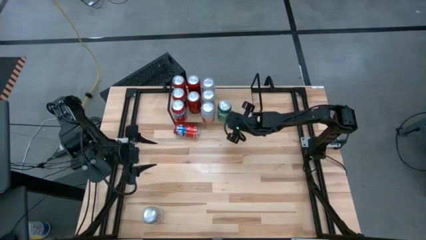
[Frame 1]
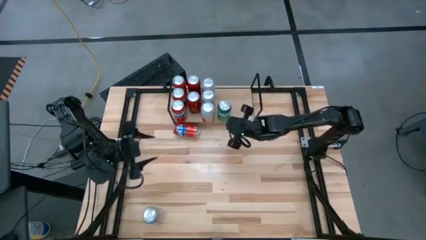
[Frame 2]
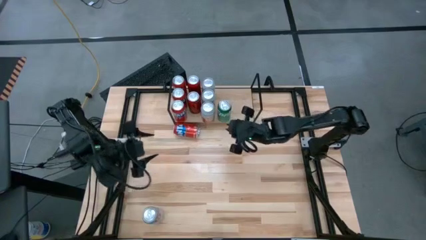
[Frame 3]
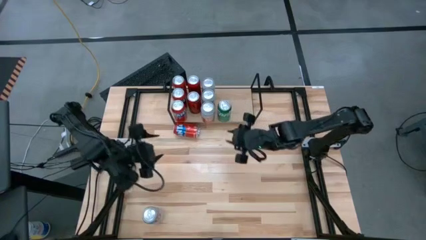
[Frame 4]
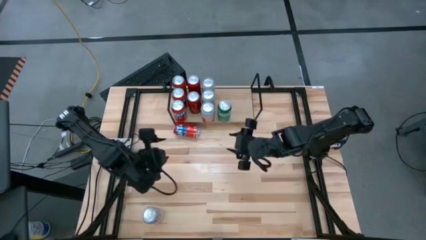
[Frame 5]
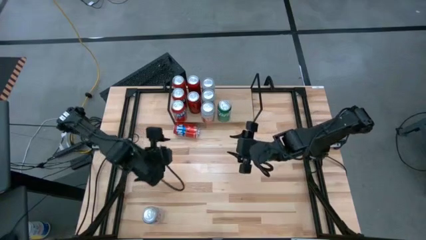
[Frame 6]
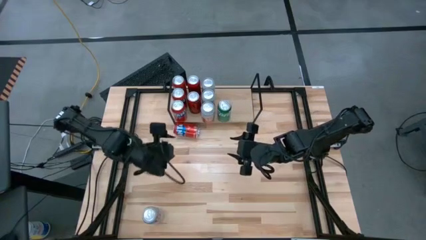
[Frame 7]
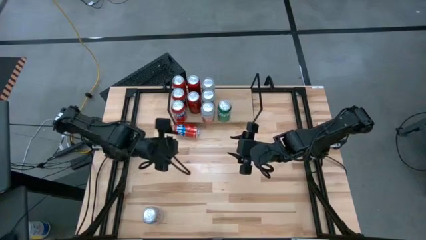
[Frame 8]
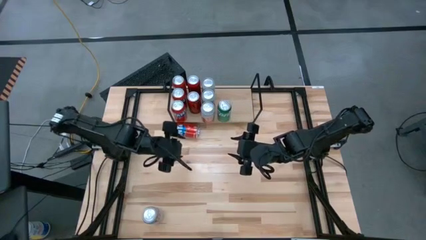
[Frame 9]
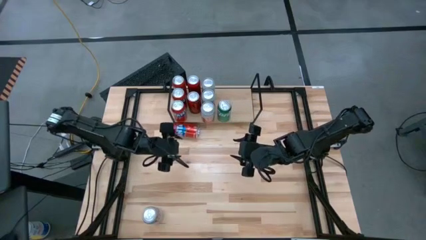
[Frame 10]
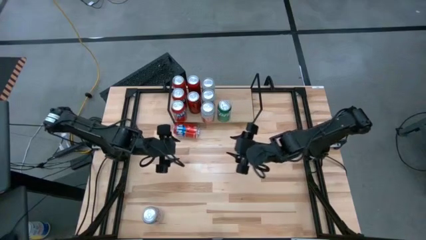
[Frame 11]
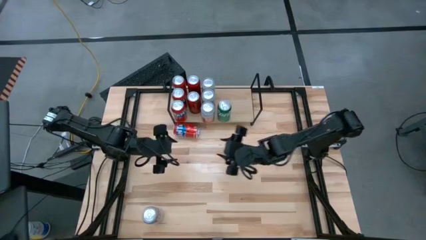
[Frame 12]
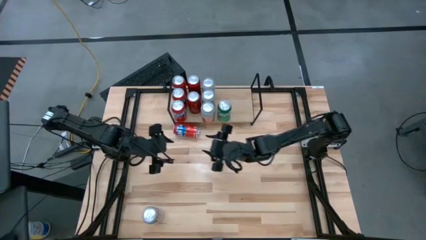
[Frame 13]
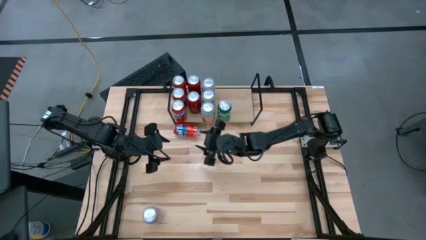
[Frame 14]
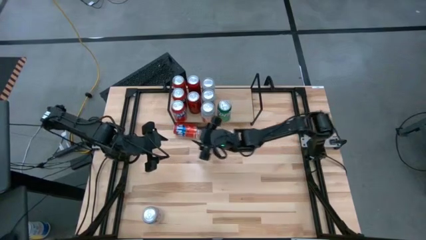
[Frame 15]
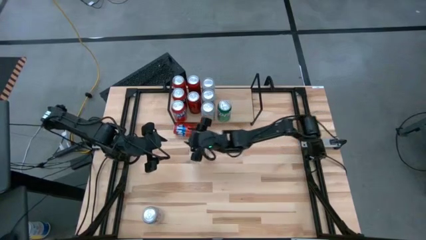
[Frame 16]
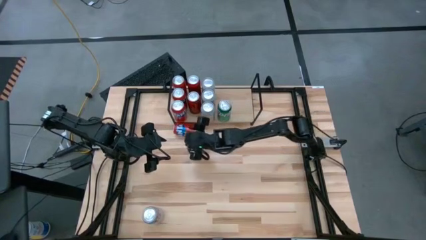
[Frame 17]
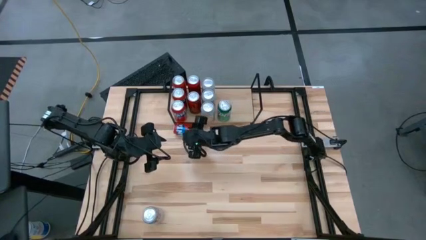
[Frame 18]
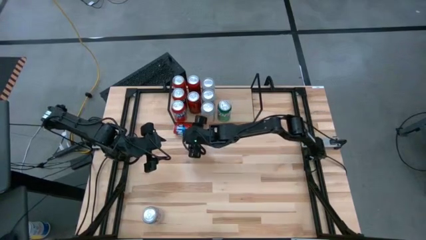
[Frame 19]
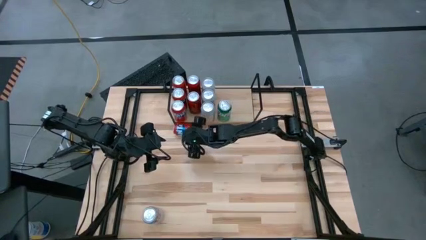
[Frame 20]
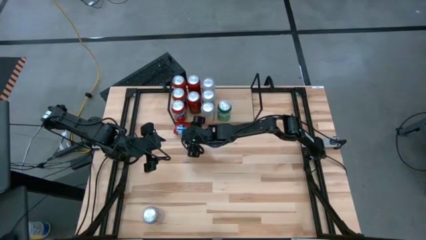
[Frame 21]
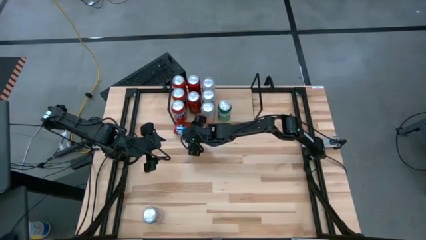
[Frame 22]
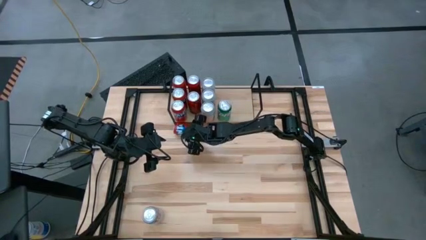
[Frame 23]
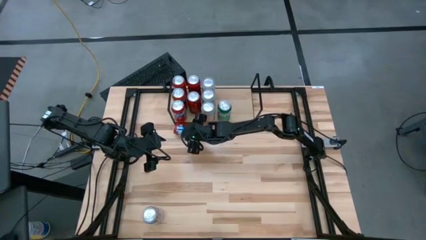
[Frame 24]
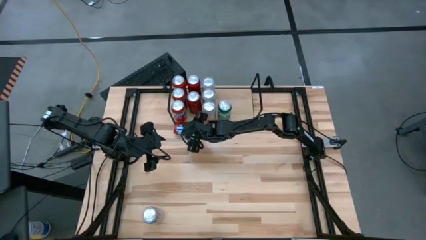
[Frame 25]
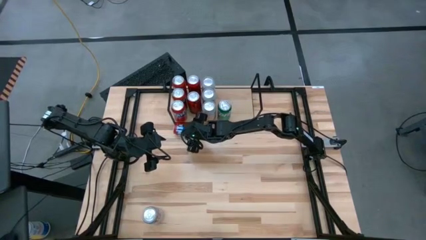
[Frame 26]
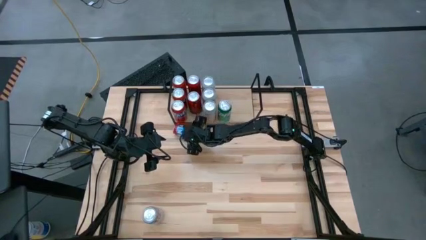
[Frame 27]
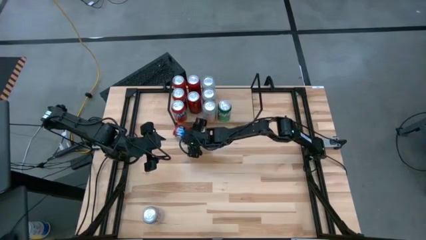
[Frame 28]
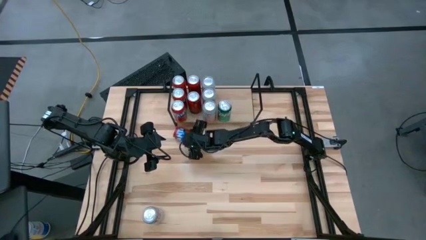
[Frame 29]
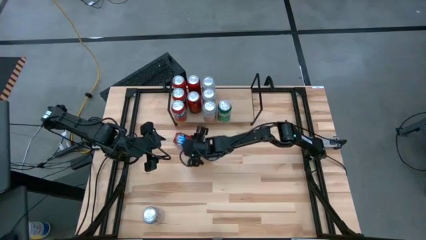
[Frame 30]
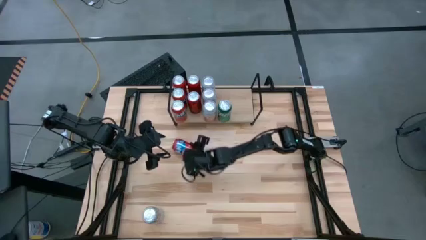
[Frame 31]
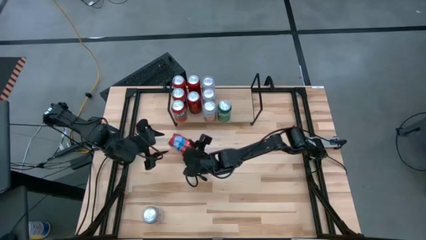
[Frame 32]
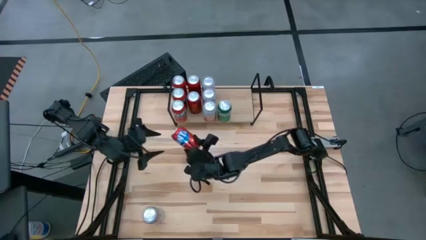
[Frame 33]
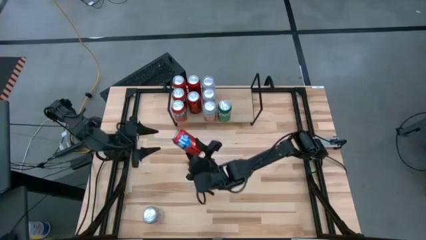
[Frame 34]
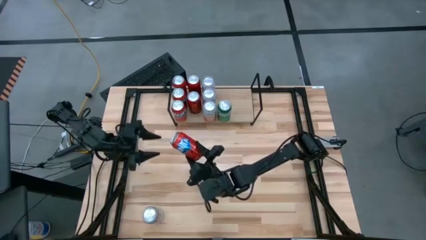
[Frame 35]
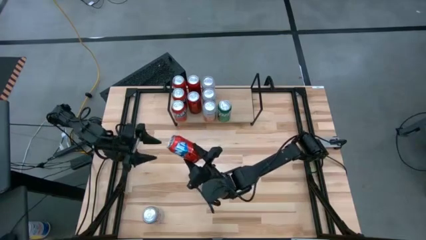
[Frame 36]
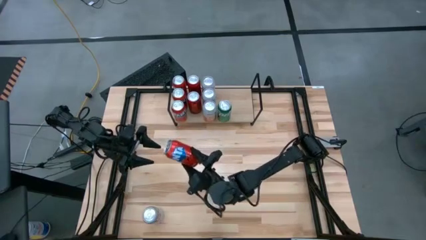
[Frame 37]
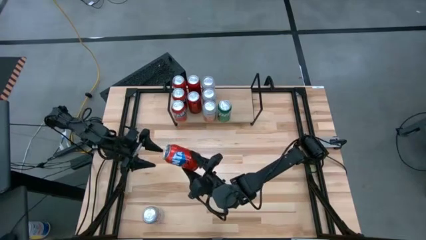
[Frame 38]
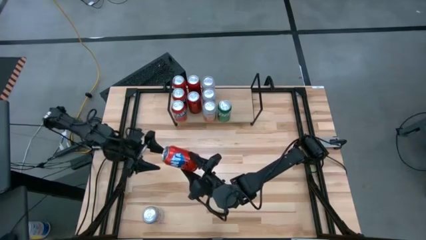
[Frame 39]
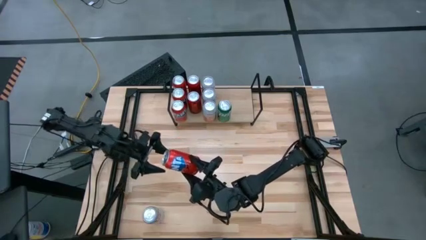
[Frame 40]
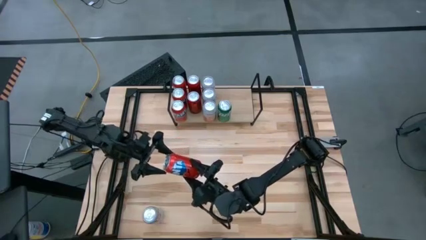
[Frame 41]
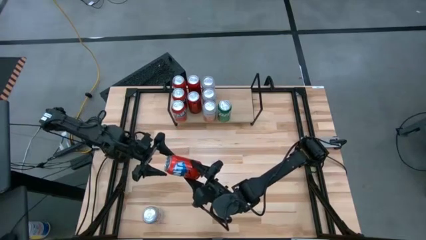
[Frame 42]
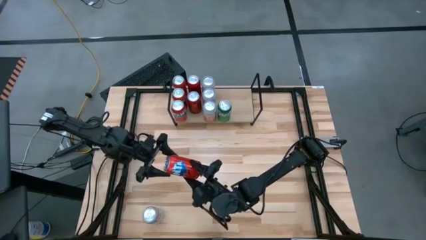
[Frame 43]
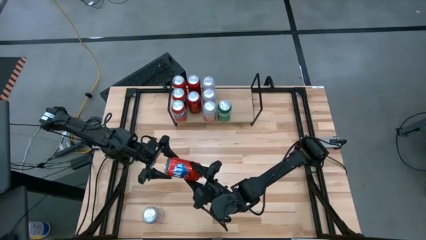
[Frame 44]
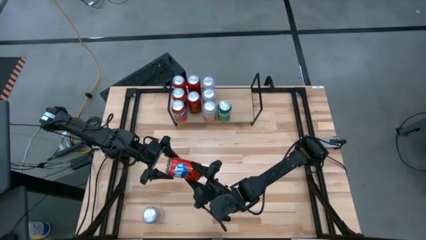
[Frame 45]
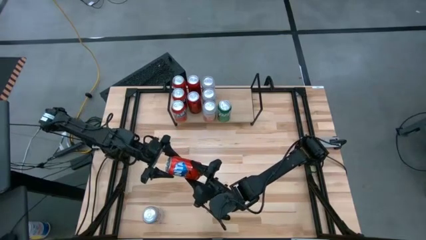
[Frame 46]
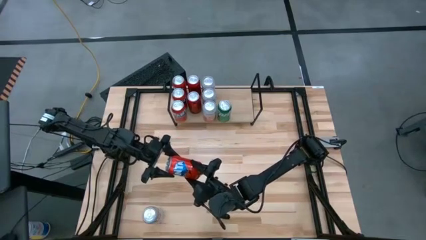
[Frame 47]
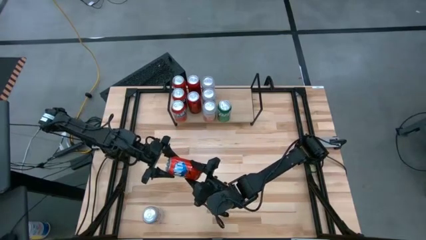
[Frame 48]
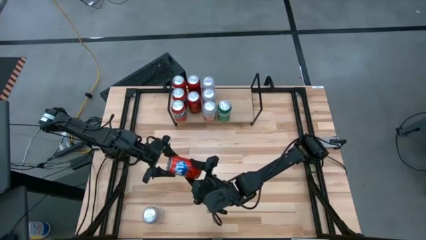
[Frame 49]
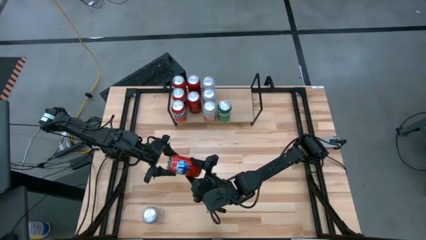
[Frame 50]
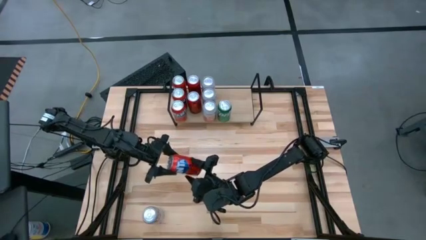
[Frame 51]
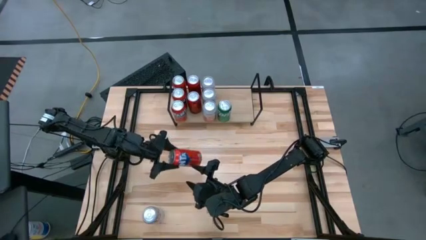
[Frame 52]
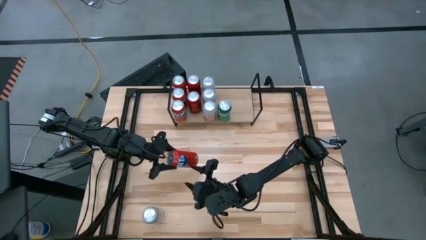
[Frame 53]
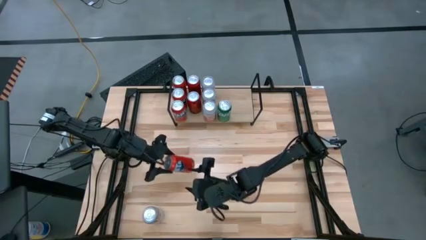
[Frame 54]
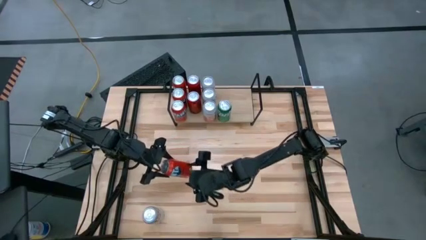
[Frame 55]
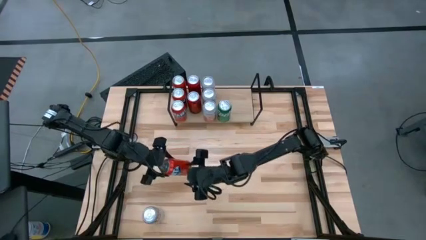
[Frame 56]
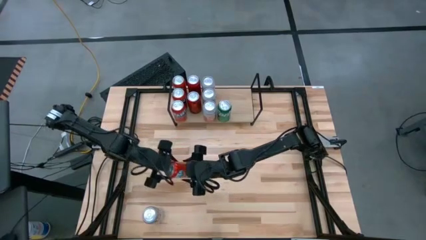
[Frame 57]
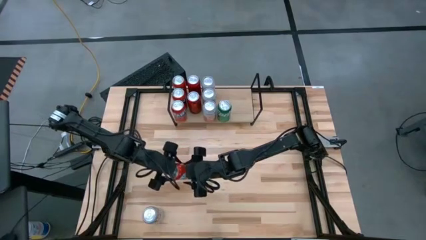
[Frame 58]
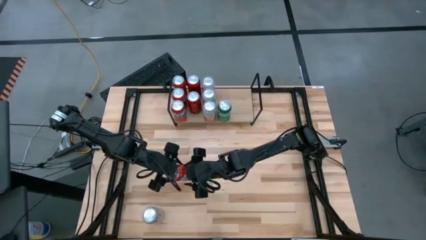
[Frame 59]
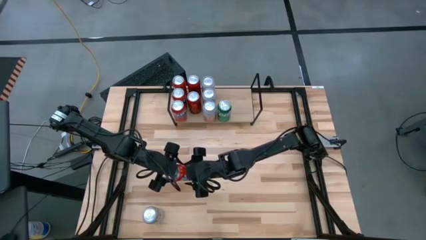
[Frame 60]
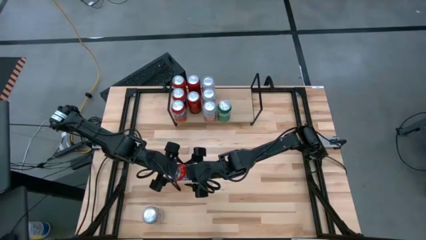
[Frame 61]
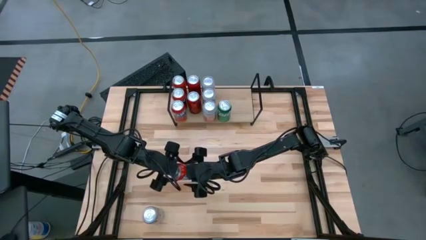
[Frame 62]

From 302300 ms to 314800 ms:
Task: Place canned beverage on shelf
Put the red soda can on the shelf

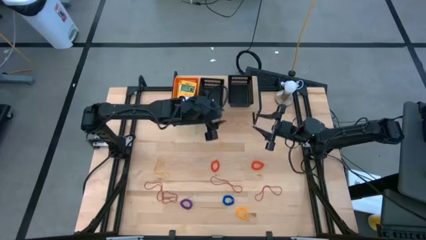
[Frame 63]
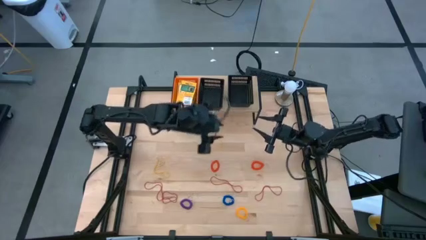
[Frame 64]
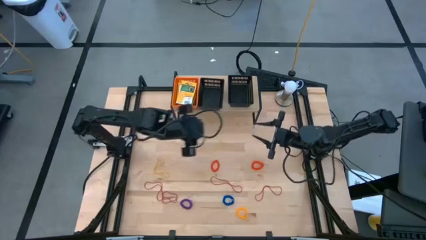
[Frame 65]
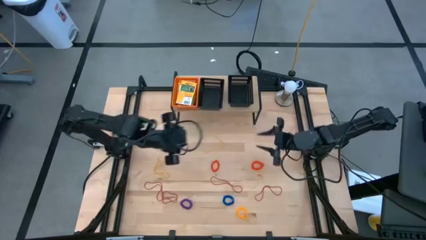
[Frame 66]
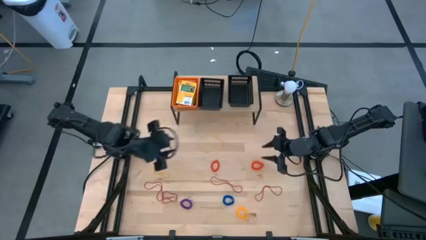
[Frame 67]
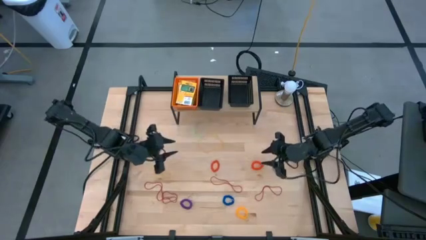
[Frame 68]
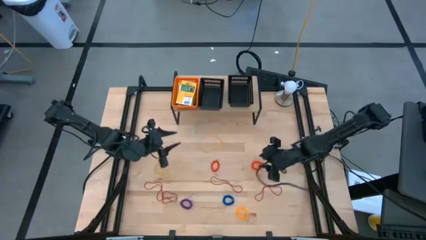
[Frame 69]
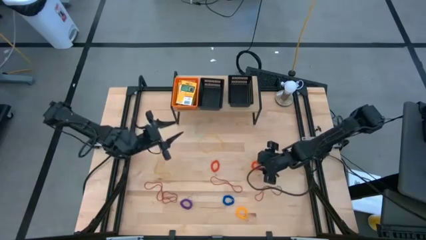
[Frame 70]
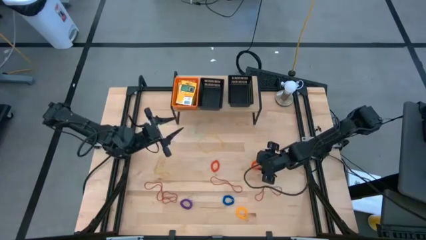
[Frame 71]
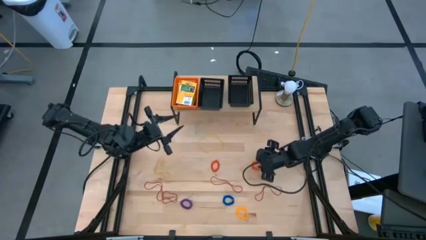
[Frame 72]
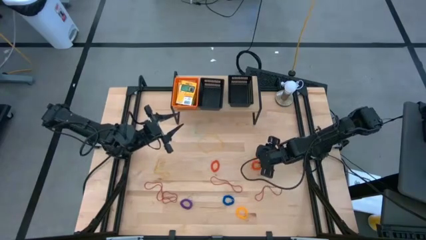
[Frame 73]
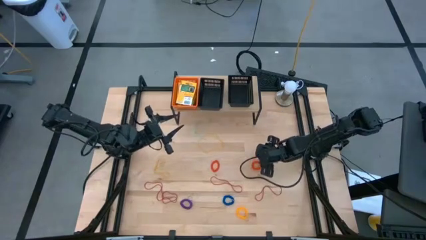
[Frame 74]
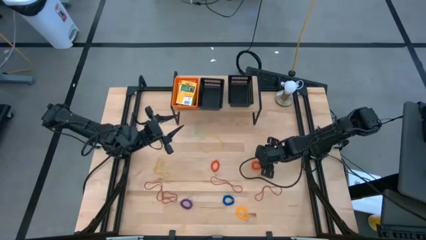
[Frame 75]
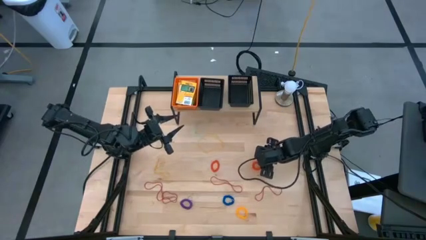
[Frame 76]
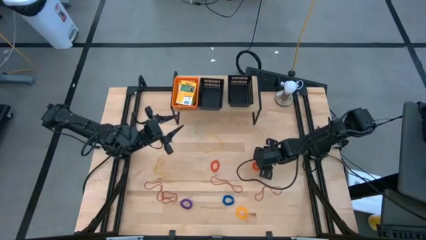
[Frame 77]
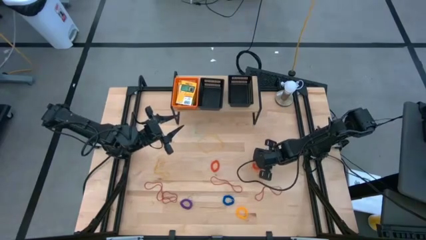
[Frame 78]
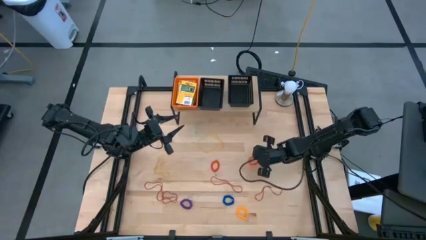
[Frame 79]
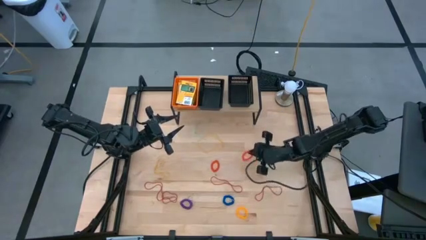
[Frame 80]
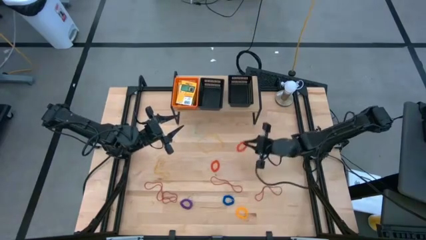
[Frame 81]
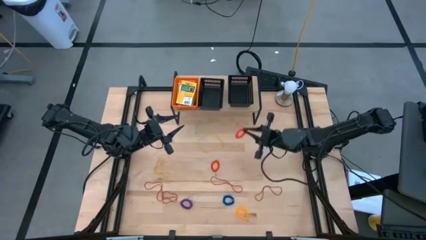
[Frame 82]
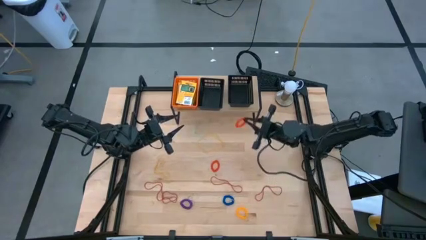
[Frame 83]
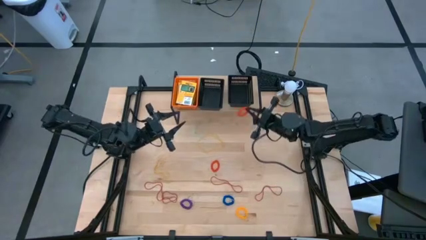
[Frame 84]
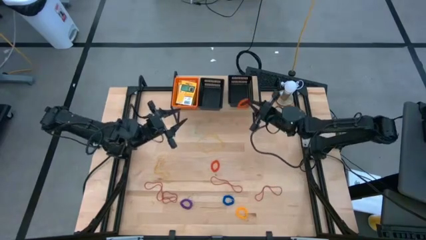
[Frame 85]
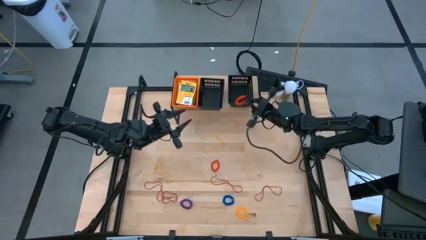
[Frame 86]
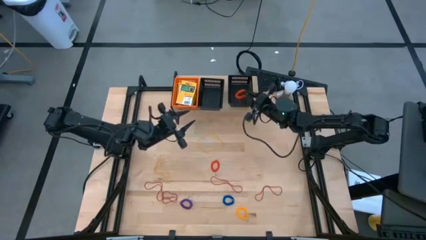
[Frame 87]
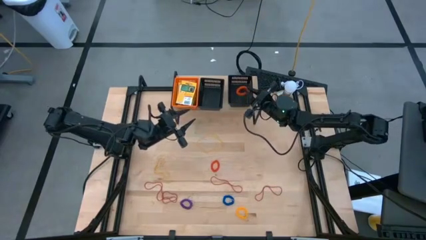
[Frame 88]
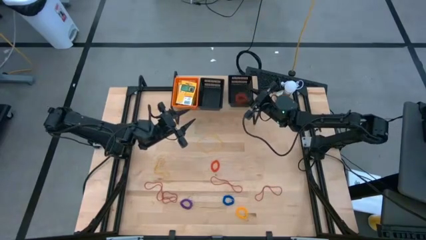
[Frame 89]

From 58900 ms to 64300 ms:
Task: Pick & Place Office Desk Supplies
Put the orange spring keychain into the right black bin on the shelf
